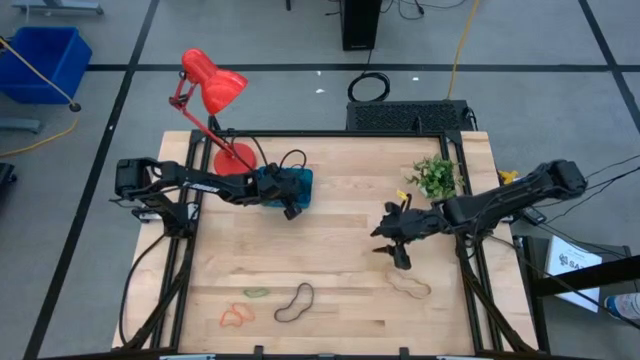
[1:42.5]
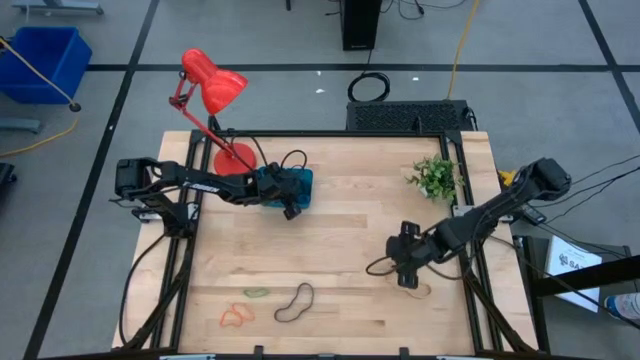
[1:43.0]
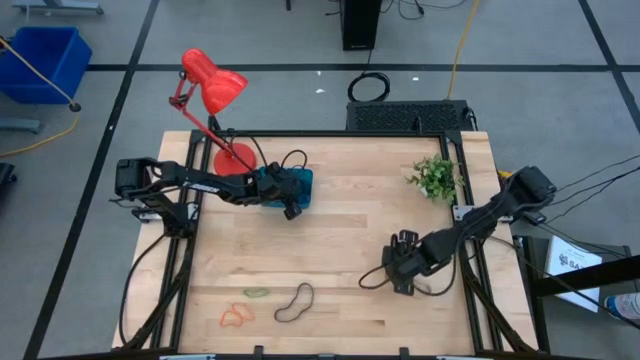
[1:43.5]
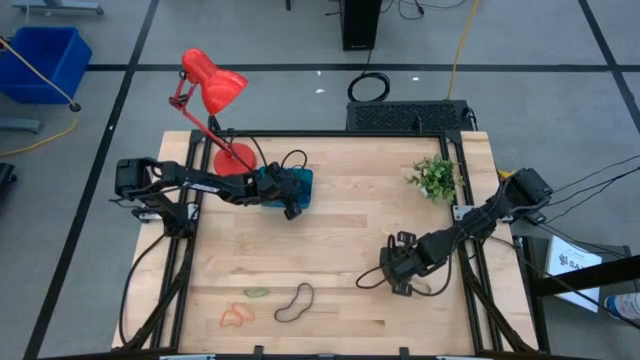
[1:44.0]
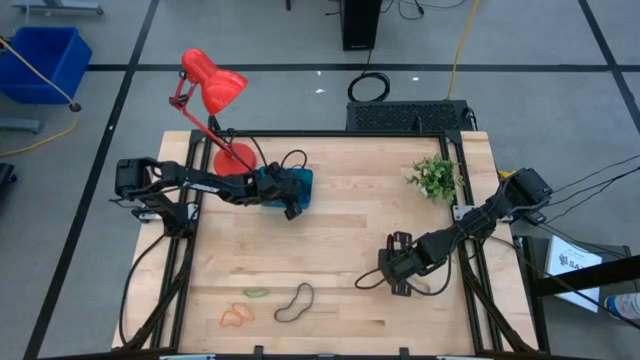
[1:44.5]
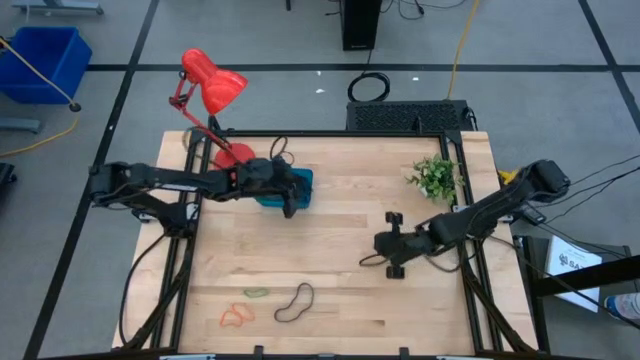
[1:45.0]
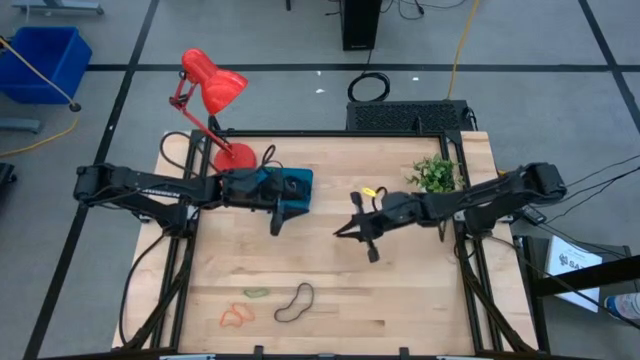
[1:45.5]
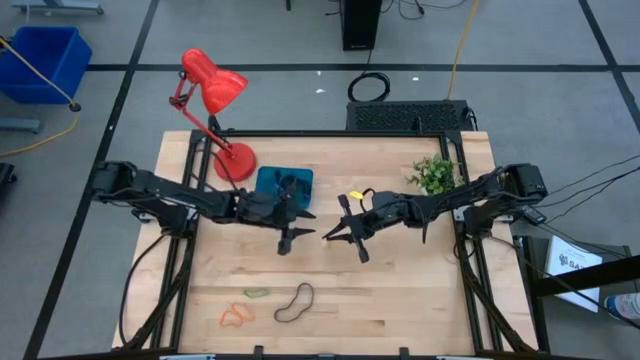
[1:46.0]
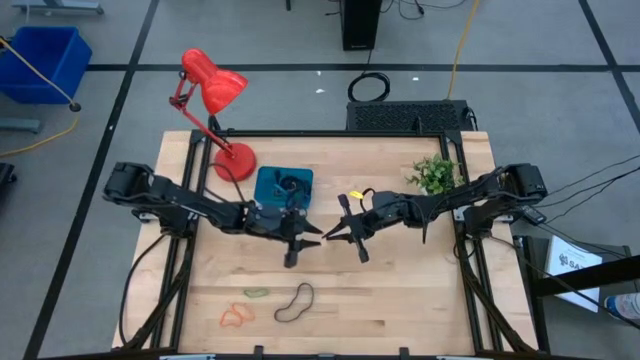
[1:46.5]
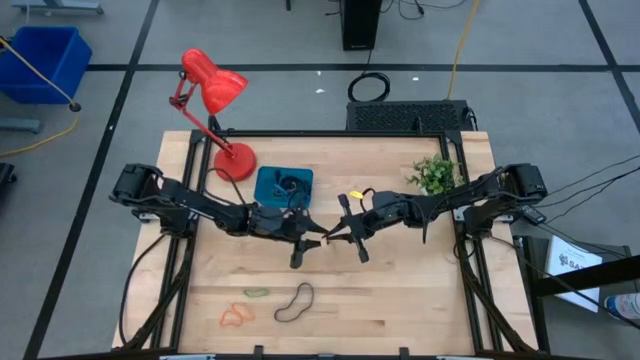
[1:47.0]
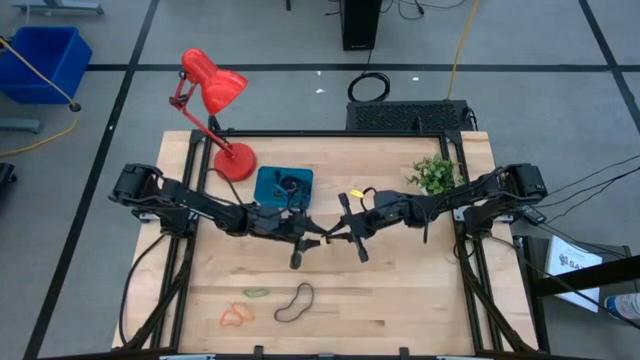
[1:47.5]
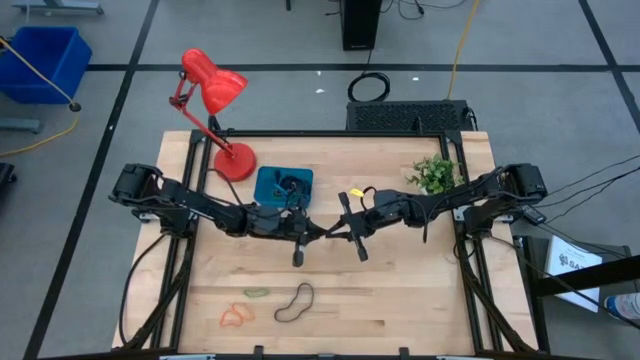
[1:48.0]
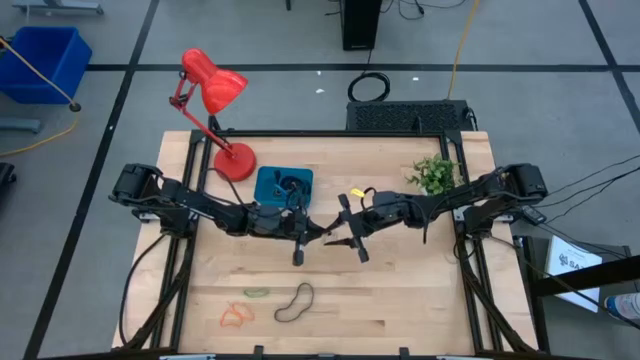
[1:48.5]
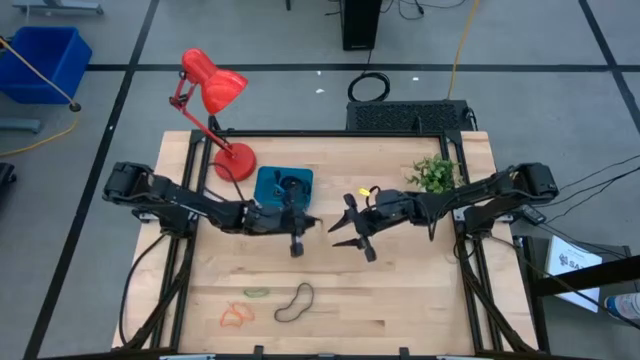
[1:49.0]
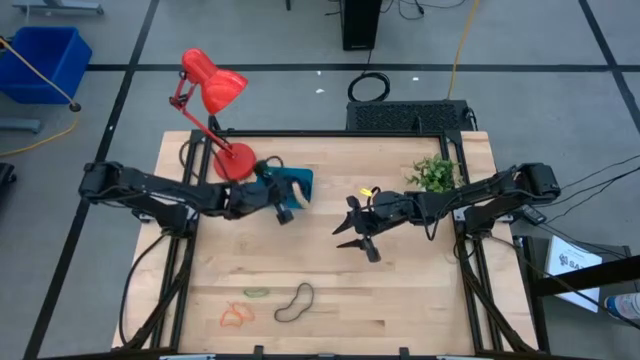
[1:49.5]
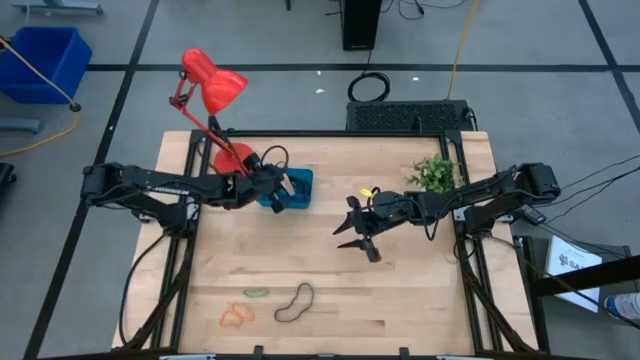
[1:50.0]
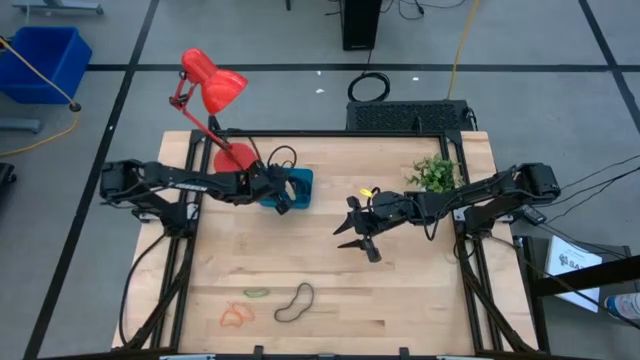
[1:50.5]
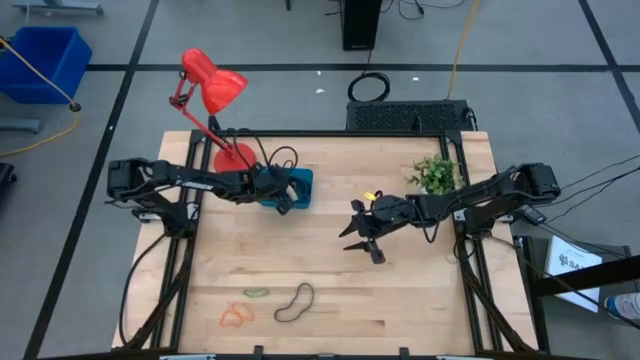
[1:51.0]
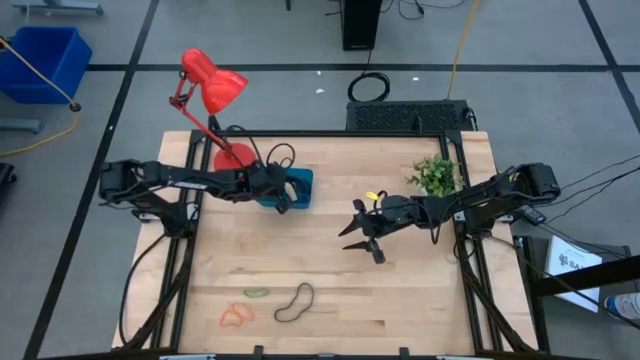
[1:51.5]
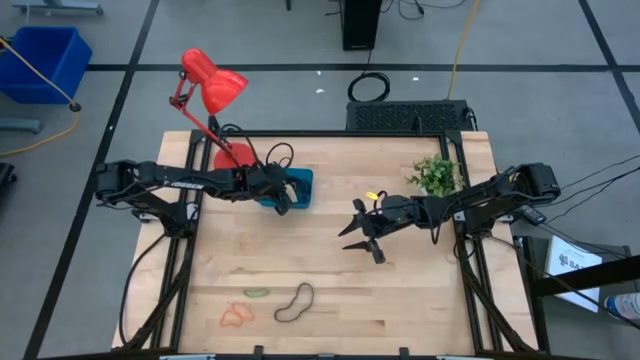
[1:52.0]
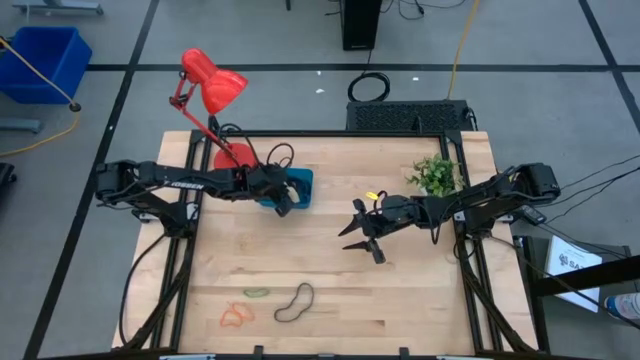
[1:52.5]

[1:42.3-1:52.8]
Task: Pick and place rubber bands into bin
Put the brown rubber band into the blue bin

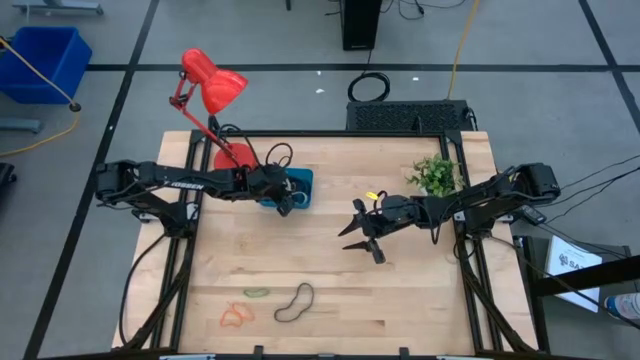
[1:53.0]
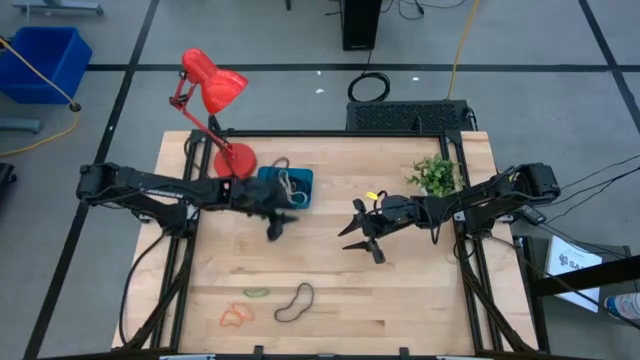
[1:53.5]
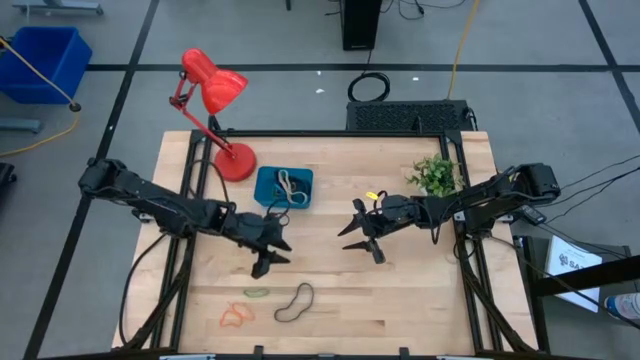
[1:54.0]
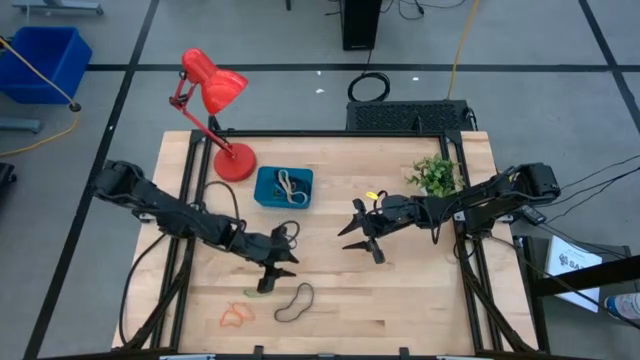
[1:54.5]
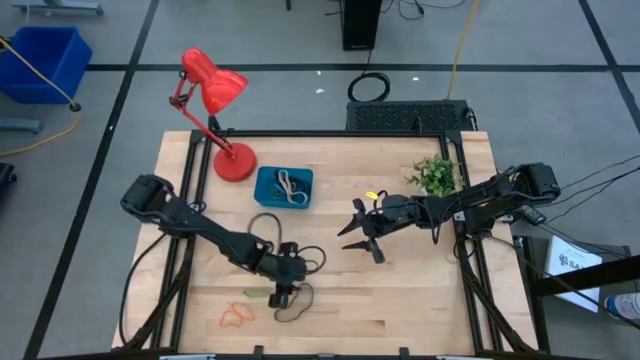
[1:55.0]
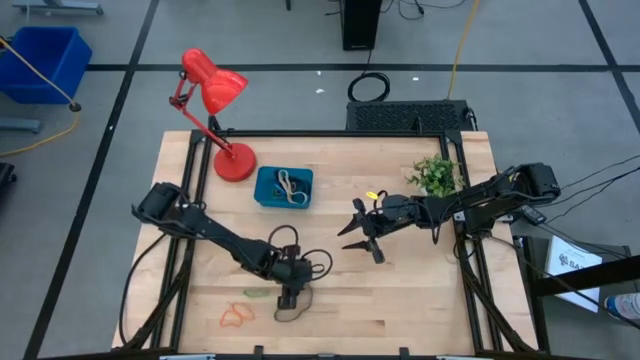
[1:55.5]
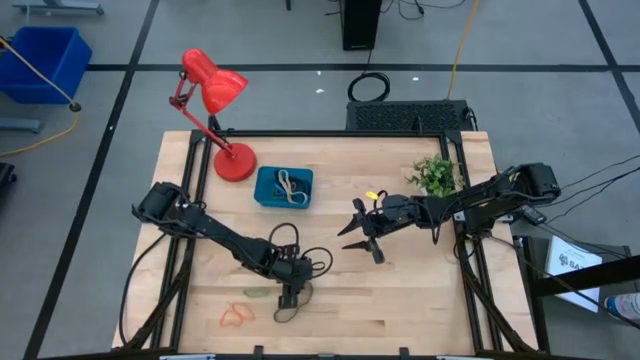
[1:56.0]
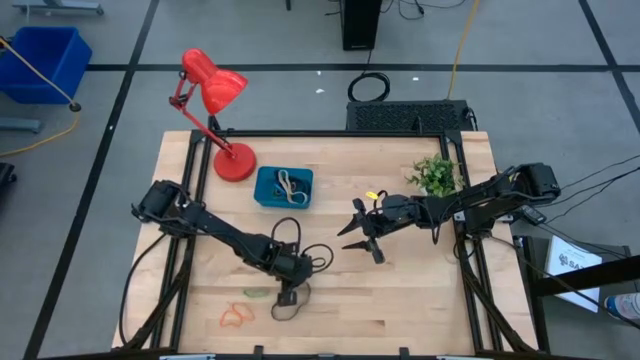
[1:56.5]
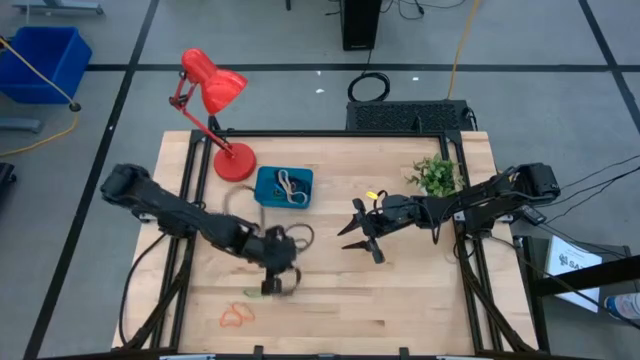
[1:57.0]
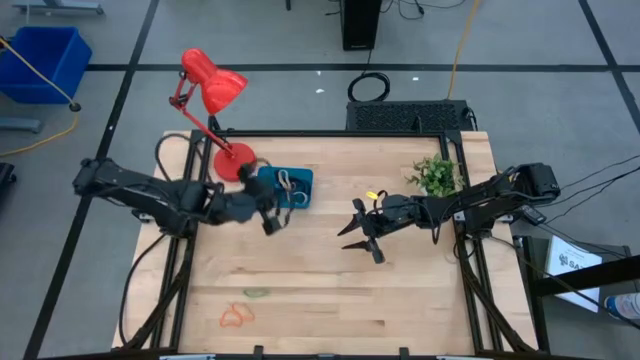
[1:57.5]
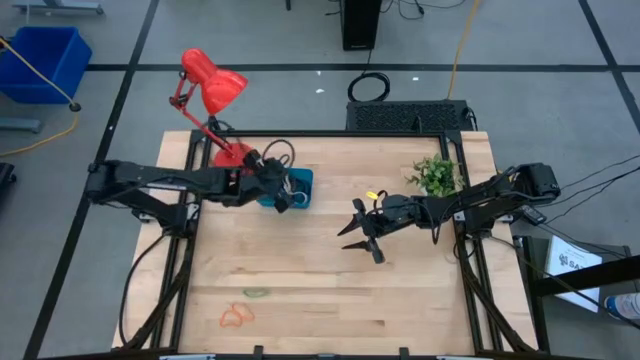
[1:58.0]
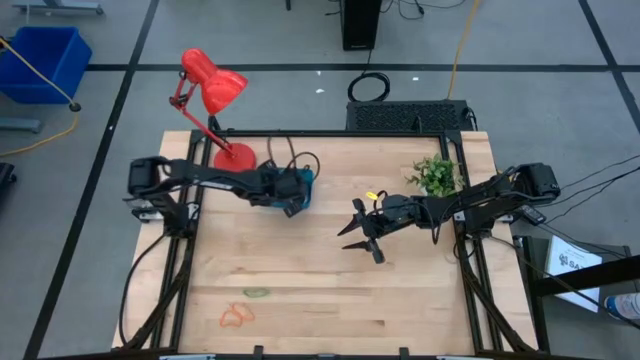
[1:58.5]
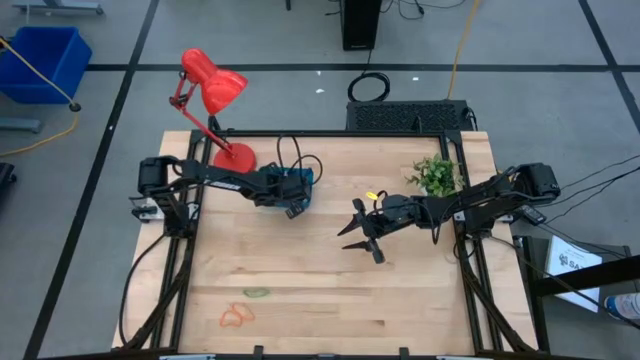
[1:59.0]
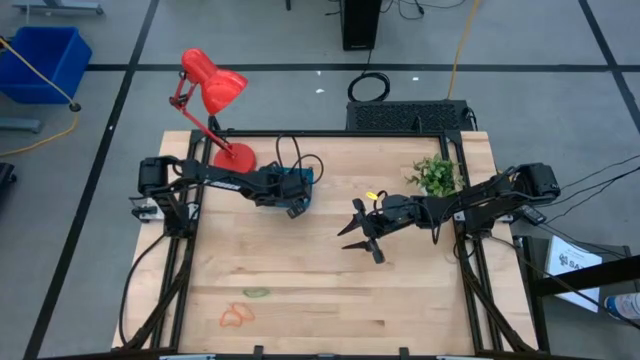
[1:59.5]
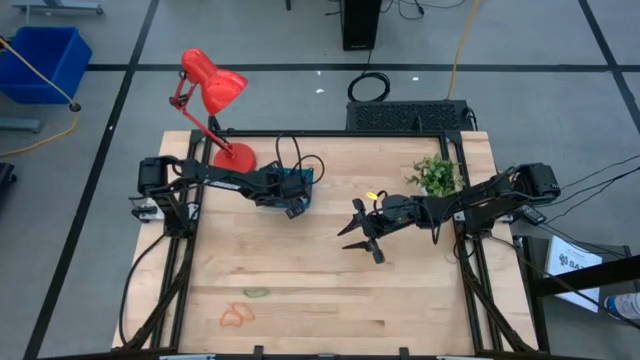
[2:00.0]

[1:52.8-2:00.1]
Put the black rubber band into the blue bin

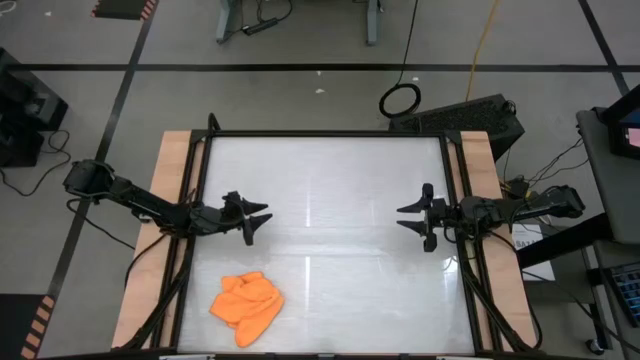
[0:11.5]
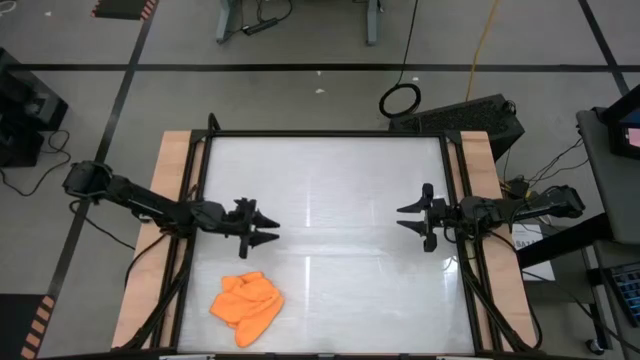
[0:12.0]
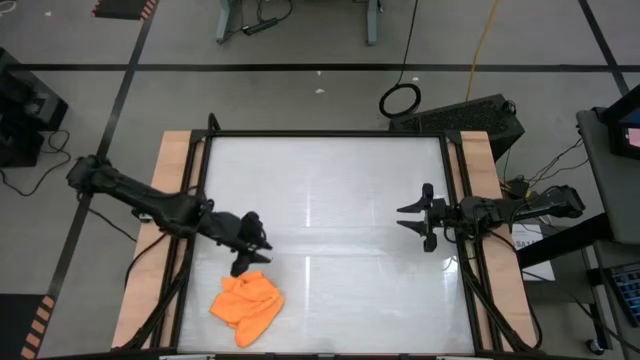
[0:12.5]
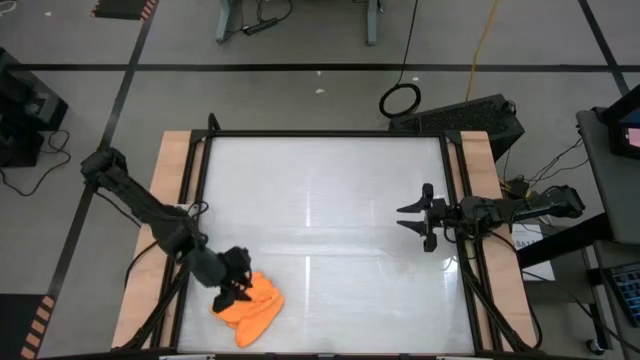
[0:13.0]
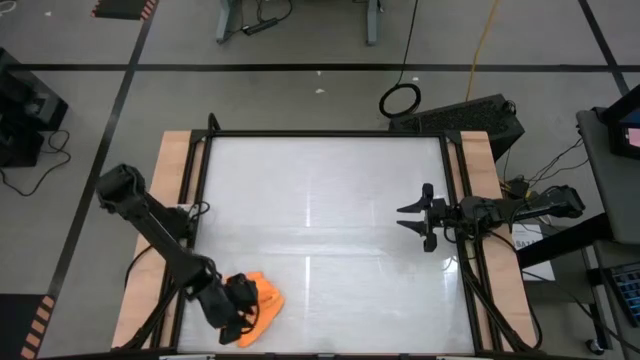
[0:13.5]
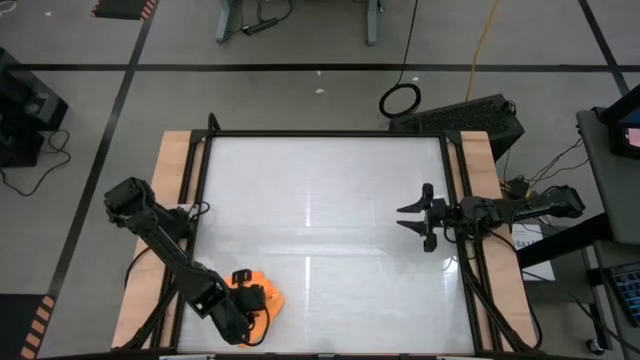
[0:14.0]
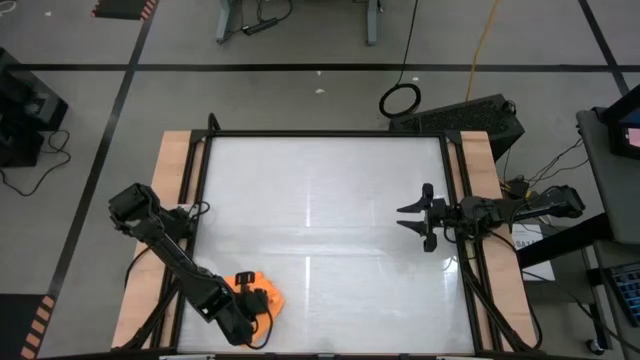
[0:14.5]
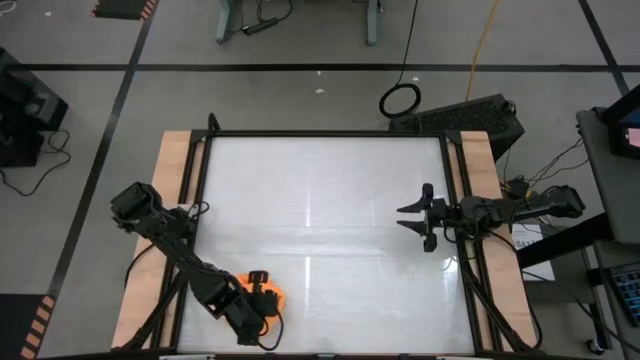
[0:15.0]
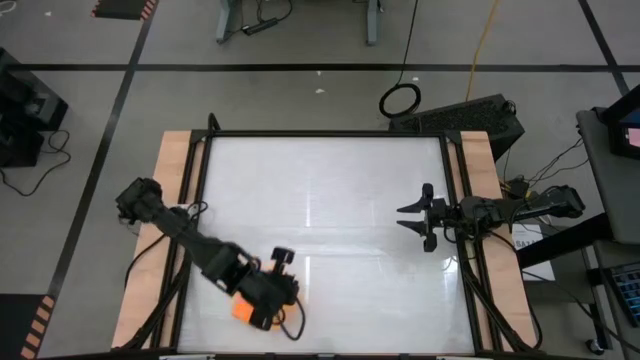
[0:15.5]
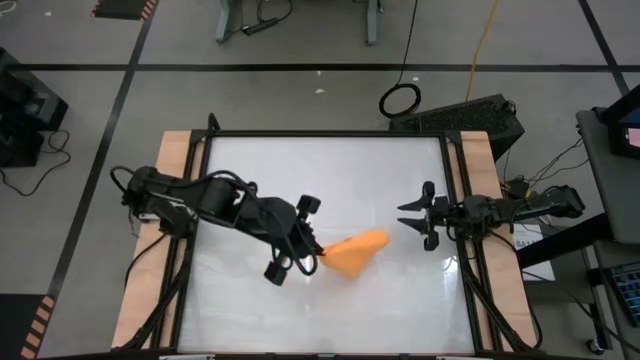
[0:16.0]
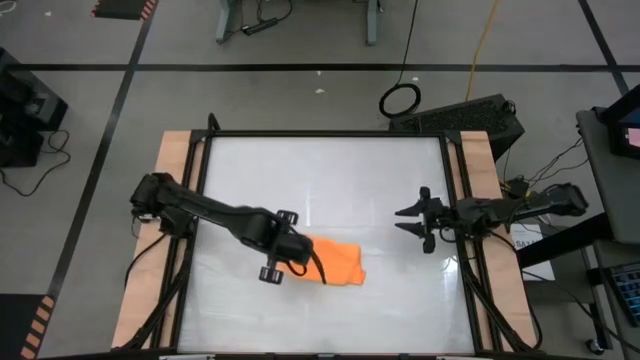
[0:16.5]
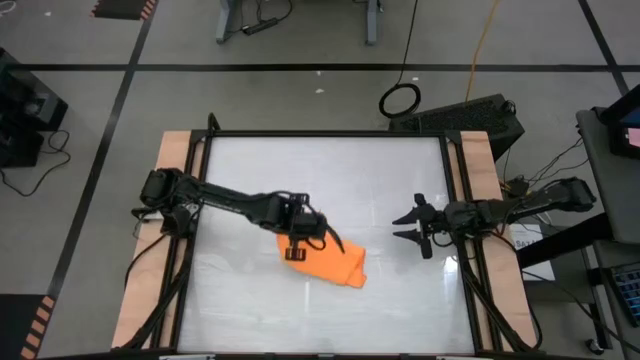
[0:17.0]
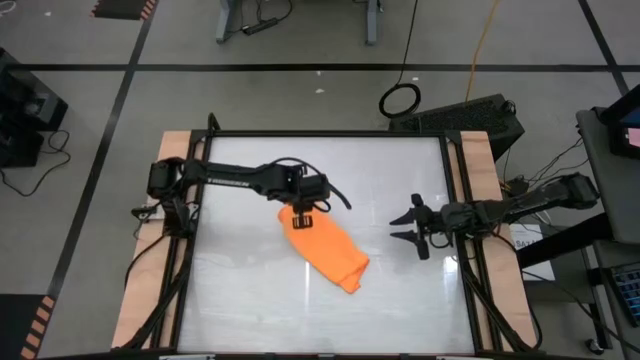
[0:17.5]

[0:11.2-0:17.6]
Task: Roll towel
Move the orange microfiber cloth to center of the table
